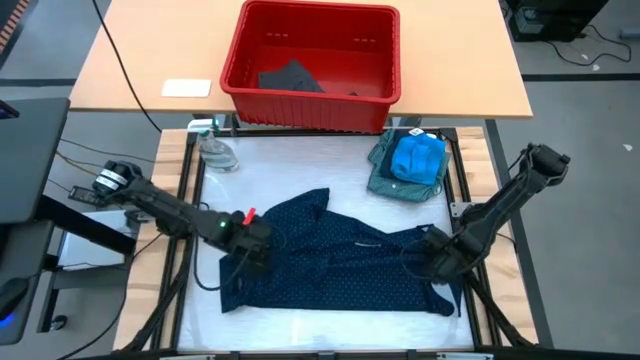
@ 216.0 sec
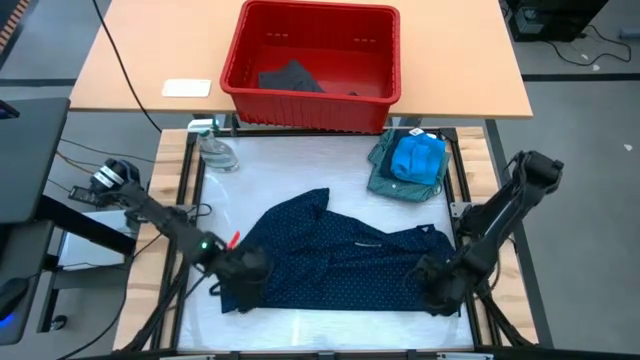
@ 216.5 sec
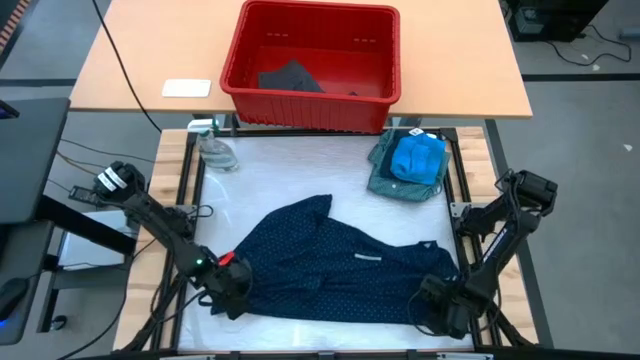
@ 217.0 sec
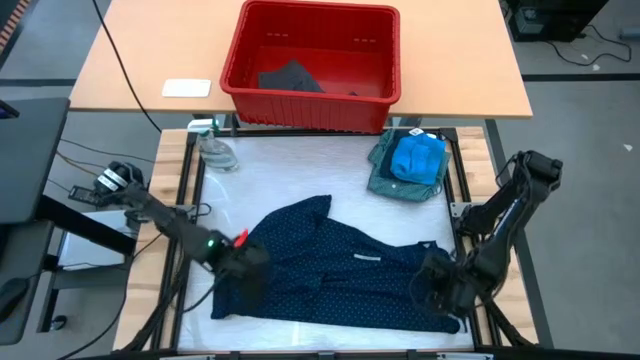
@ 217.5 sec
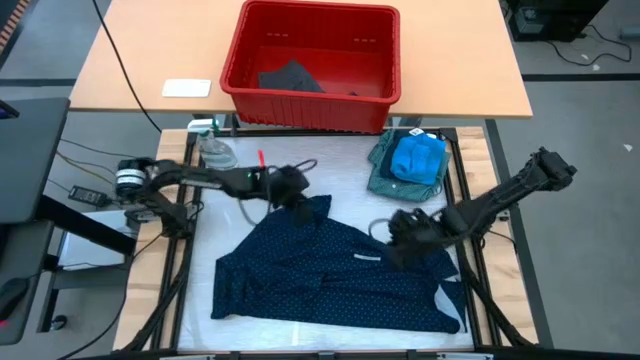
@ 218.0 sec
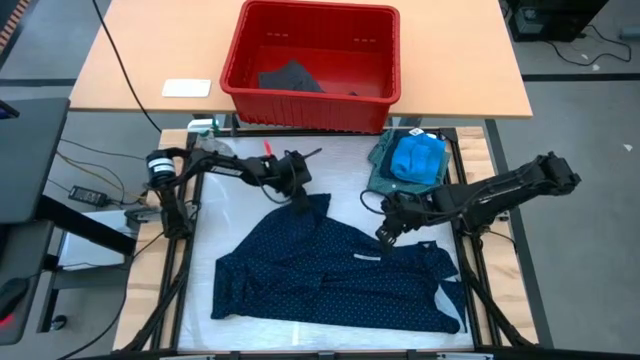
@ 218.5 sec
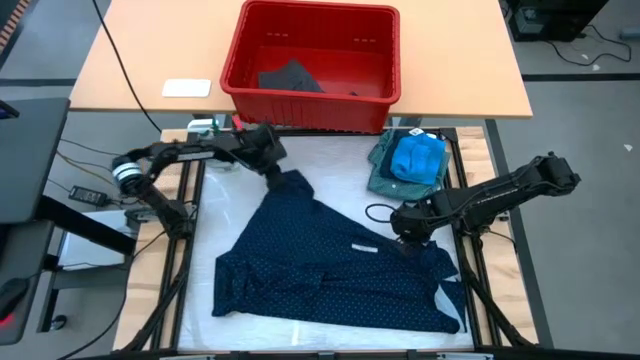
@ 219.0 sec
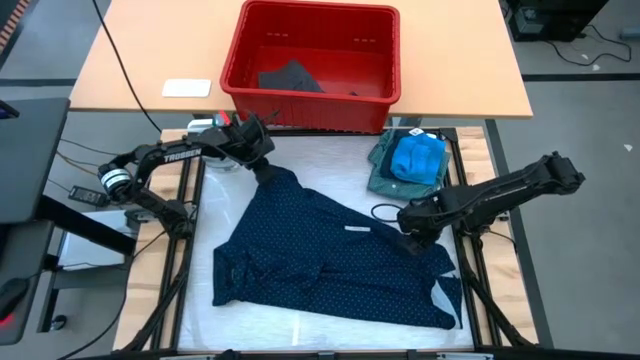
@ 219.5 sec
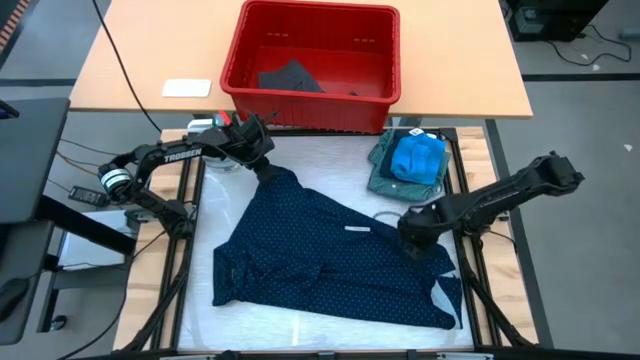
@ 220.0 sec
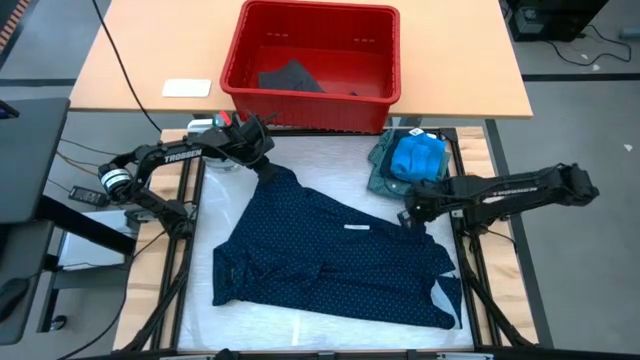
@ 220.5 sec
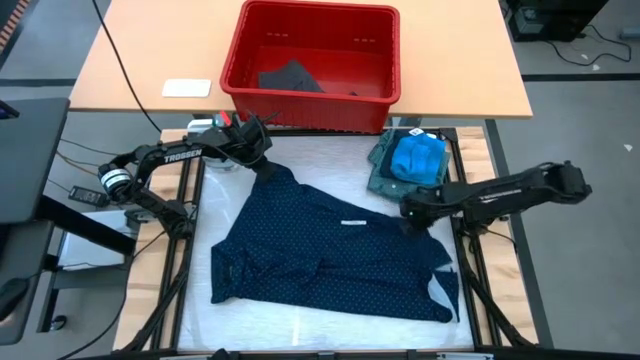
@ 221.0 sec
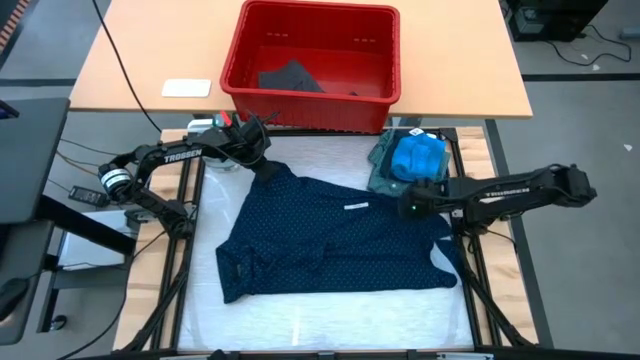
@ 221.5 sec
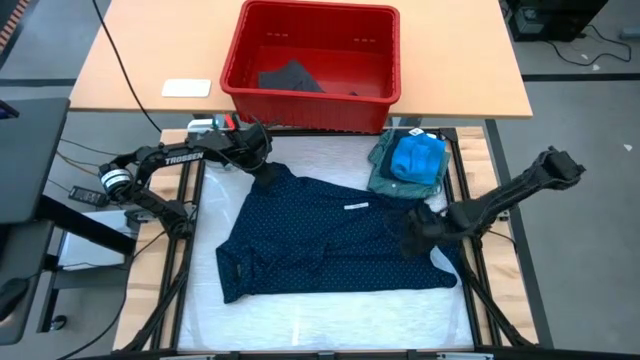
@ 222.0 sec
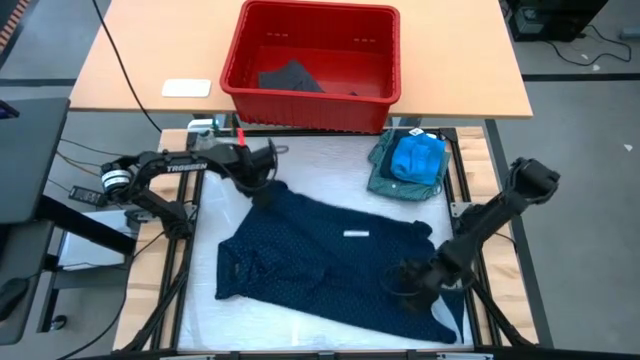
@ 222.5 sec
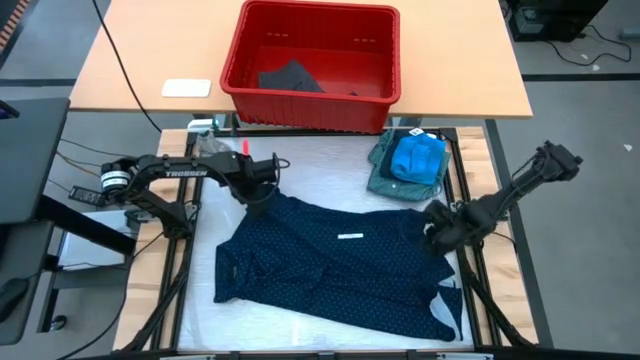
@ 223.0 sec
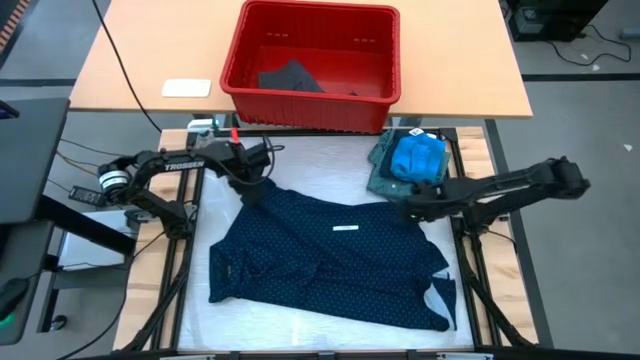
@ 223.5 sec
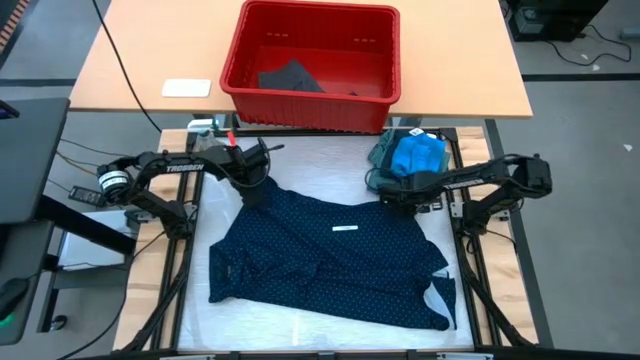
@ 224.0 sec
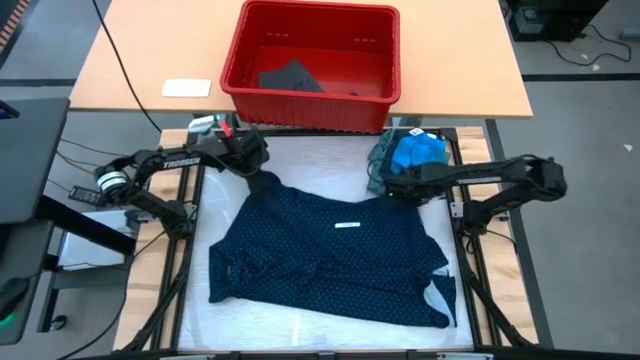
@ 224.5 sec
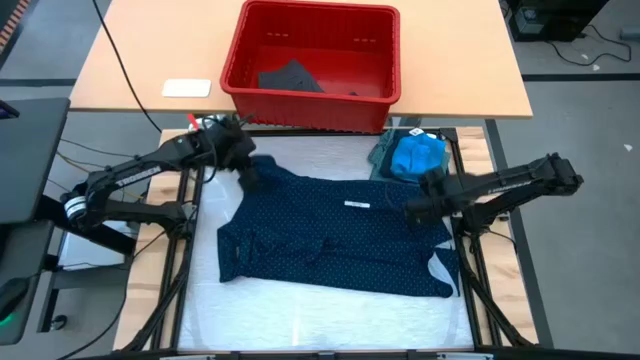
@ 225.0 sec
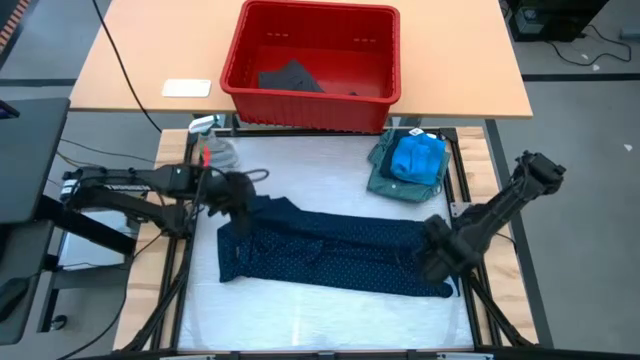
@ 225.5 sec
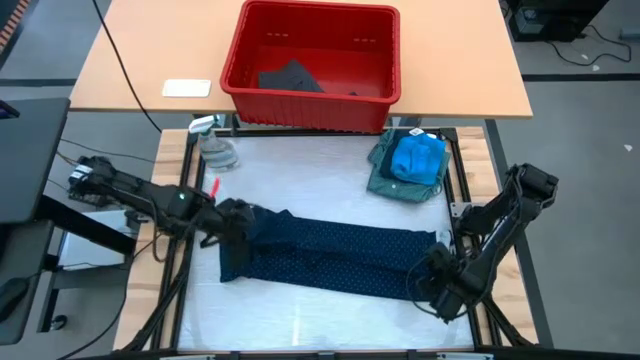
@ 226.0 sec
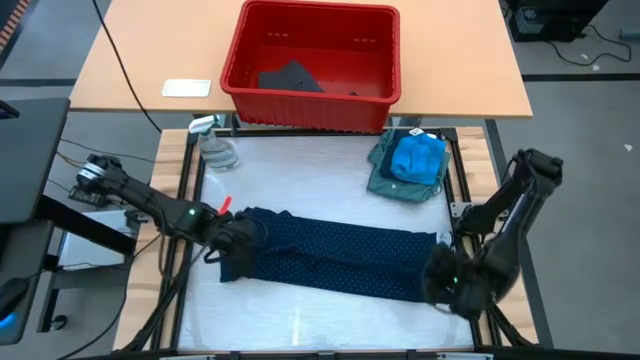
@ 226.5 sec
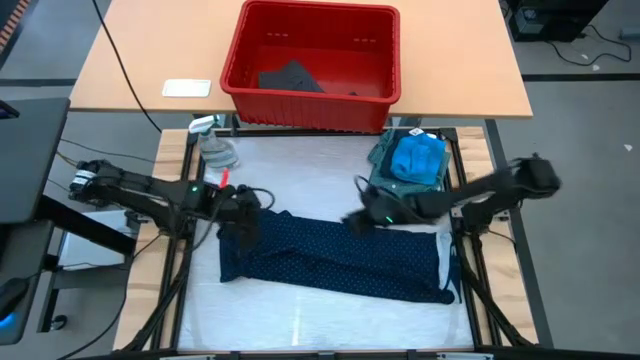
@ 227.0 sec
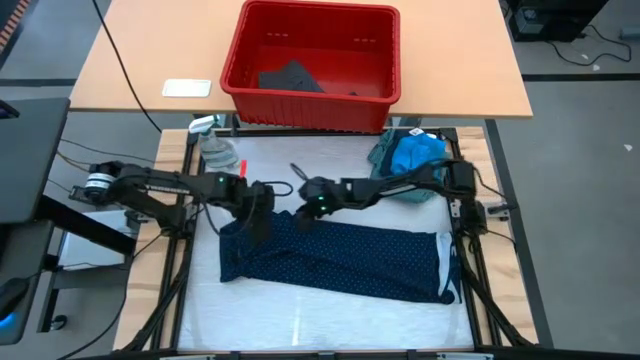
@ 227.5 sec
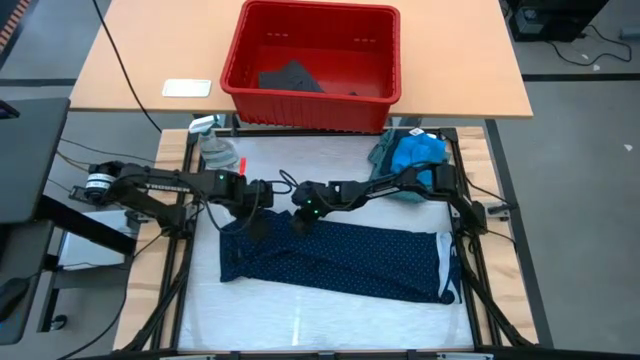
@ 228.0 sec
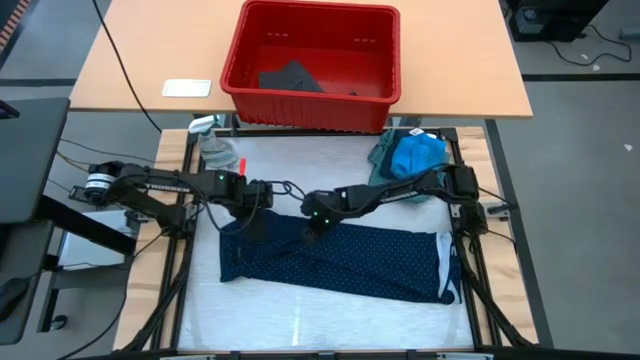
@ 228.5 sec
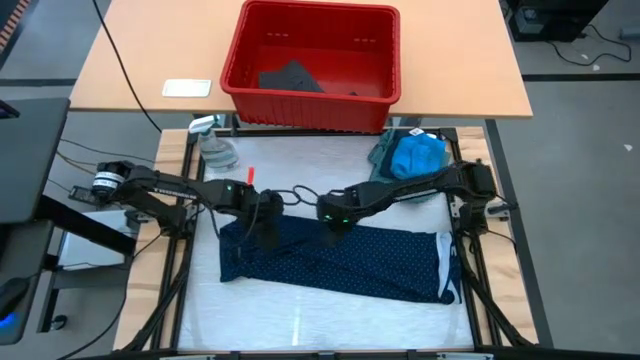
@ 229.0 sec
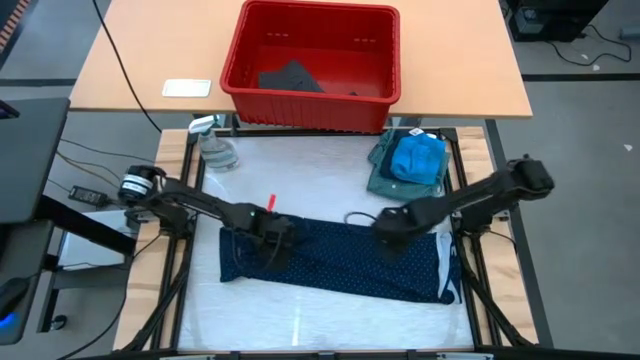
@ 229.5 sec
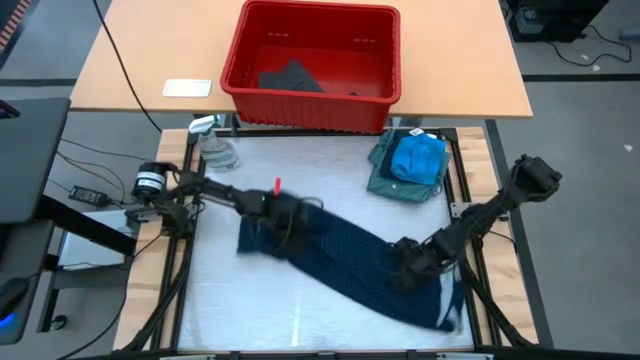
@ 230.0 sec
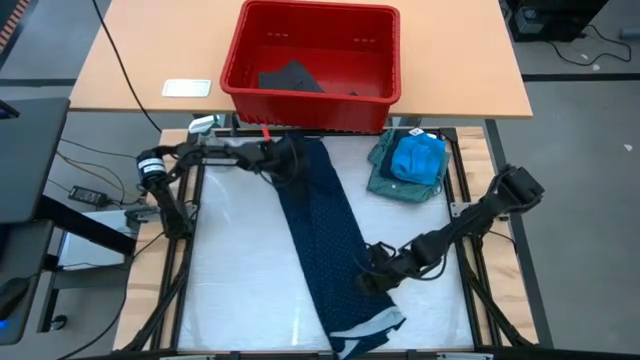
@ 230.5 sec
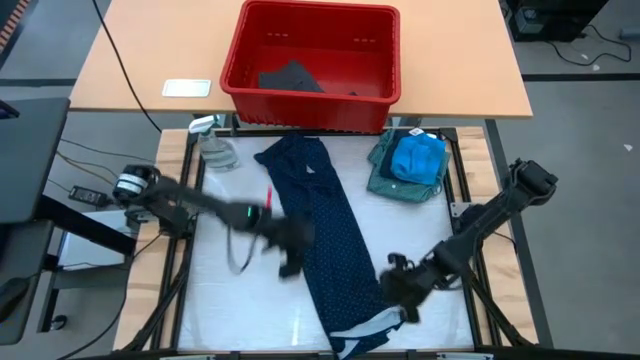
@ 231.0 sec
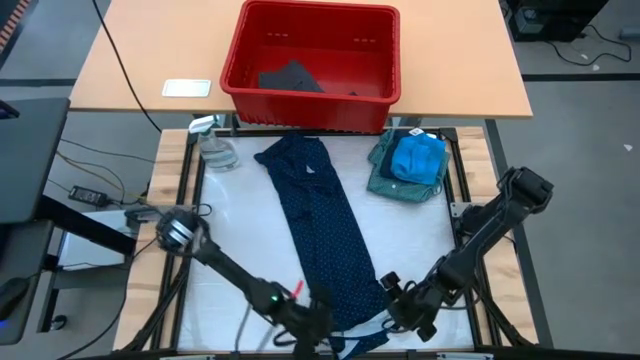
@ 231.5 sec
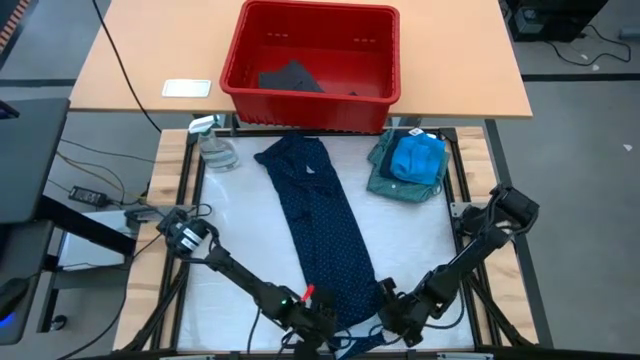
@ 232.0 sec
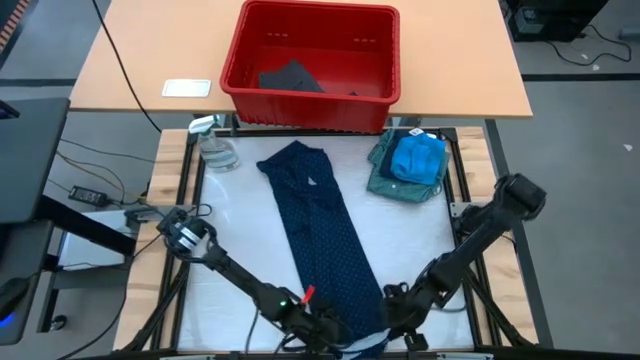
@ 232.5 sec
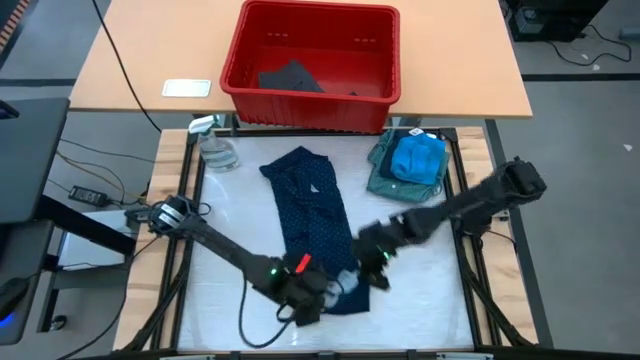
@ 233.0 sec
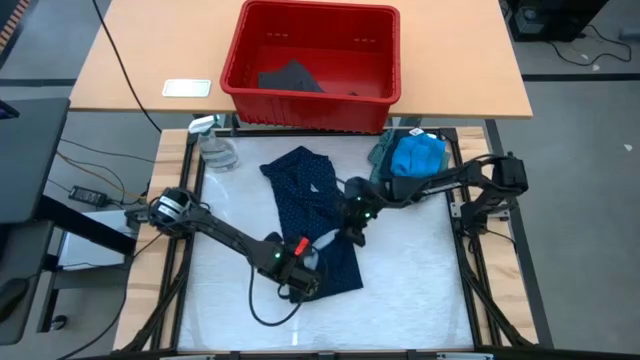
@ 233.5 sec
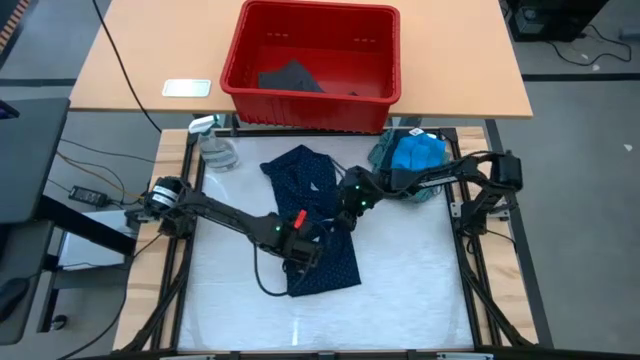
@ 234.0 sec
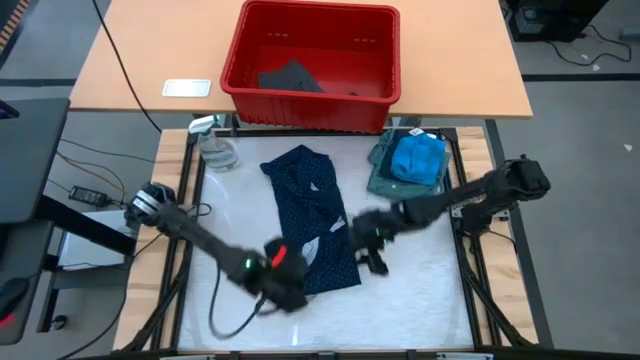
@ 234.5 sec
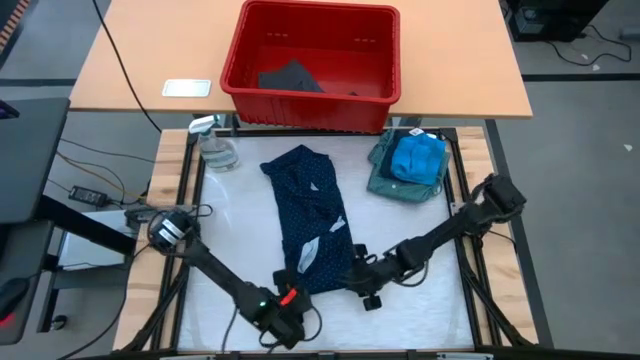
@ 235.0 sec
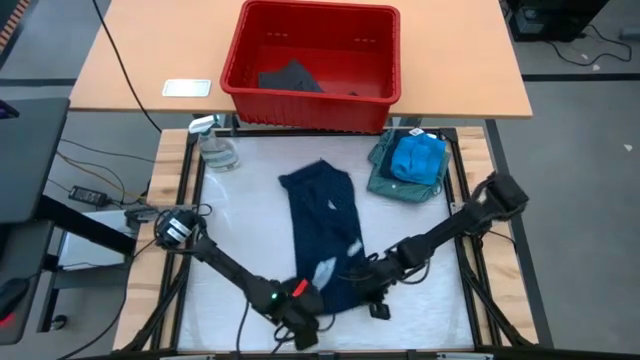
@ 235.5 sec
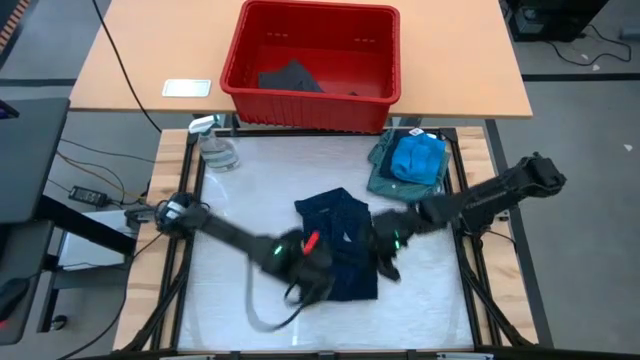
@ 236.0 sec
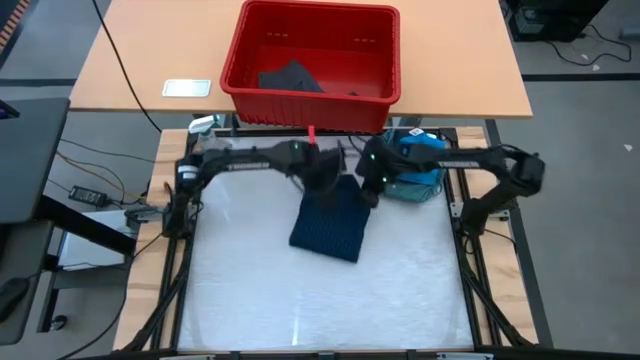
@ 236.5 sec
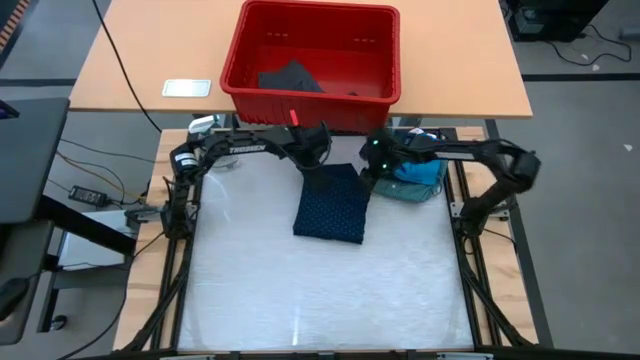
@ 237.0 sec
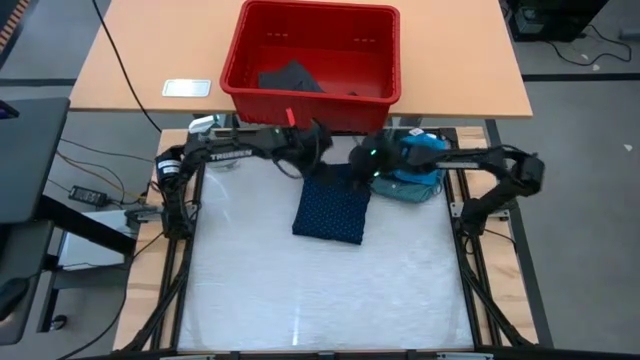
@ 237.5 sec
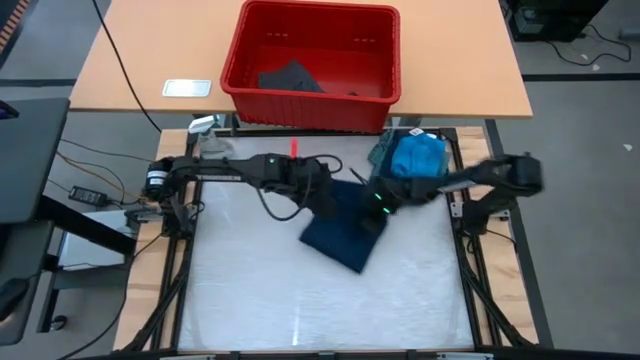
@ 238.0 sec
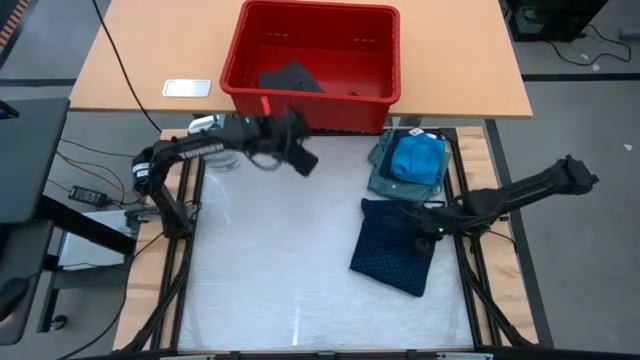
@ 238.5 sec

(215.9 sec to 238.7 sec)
Task: Fold laundry
Fold the dark blue polo shirt
